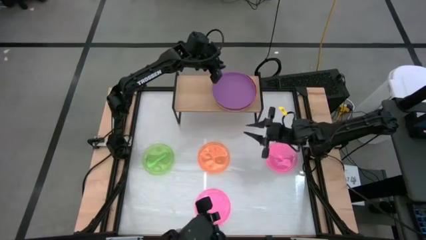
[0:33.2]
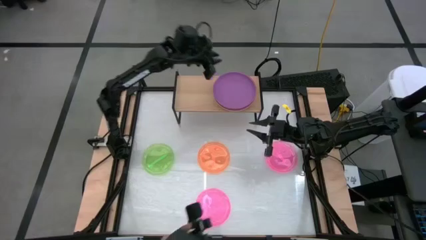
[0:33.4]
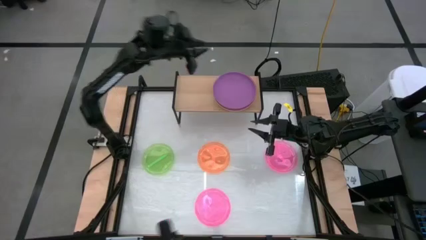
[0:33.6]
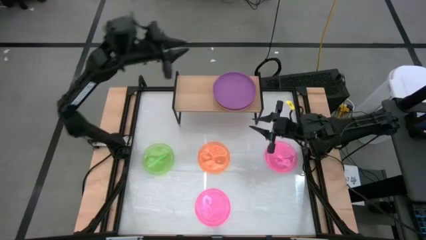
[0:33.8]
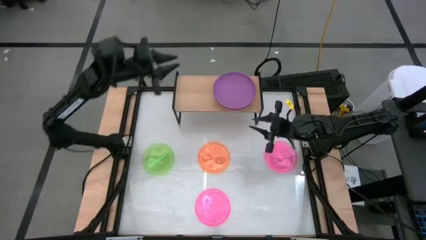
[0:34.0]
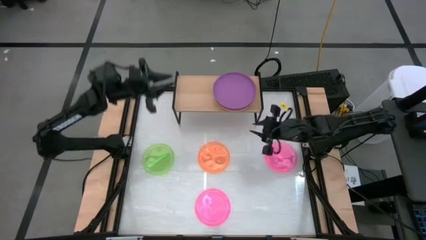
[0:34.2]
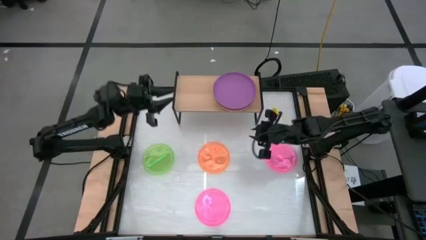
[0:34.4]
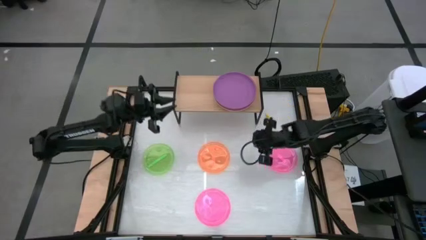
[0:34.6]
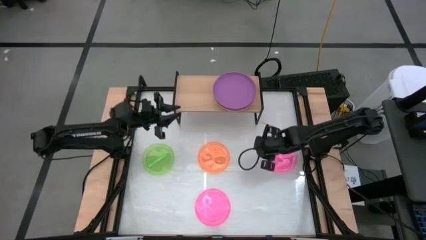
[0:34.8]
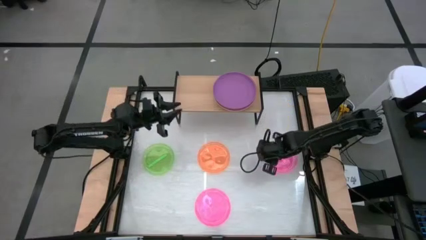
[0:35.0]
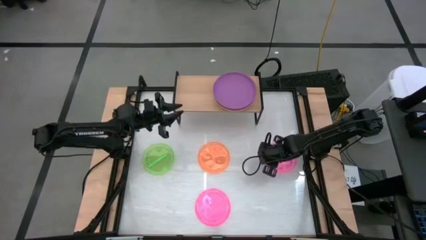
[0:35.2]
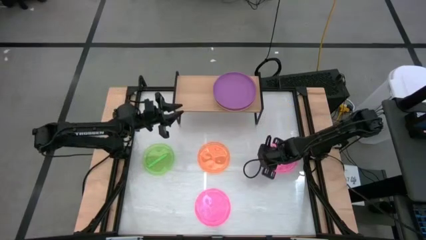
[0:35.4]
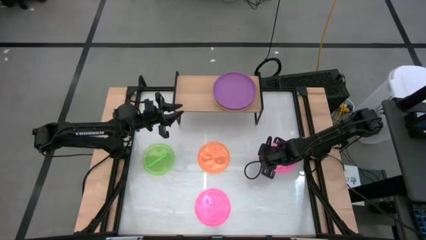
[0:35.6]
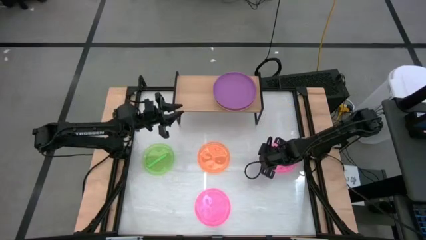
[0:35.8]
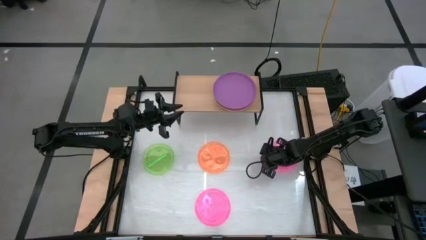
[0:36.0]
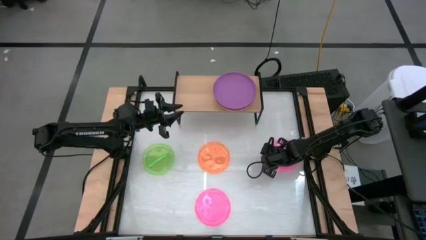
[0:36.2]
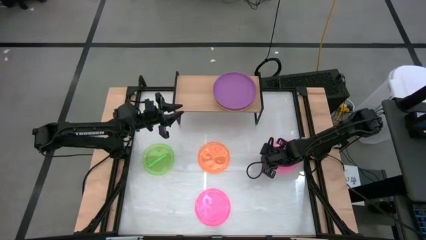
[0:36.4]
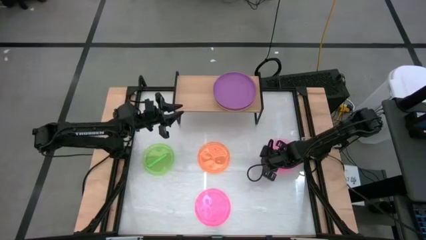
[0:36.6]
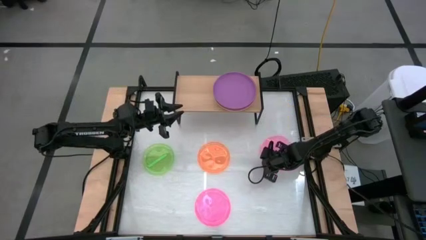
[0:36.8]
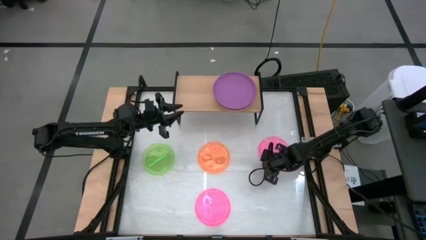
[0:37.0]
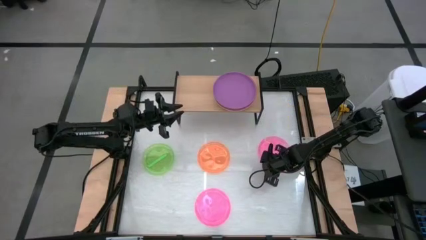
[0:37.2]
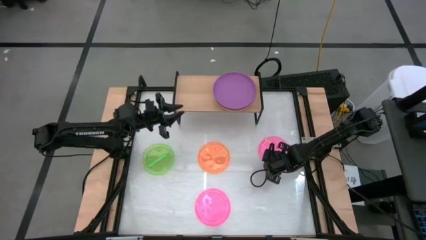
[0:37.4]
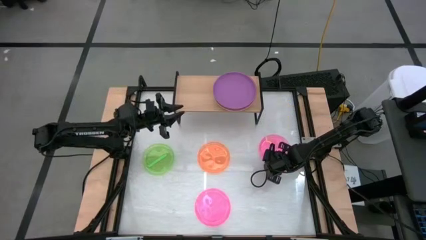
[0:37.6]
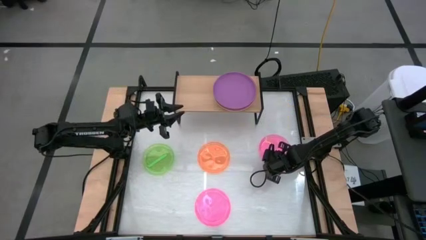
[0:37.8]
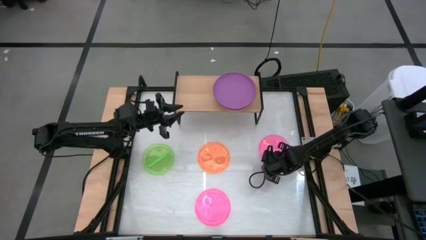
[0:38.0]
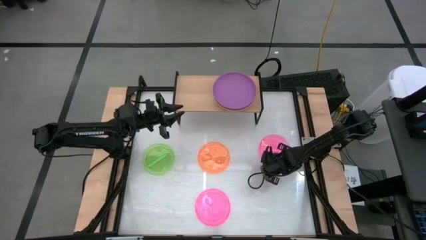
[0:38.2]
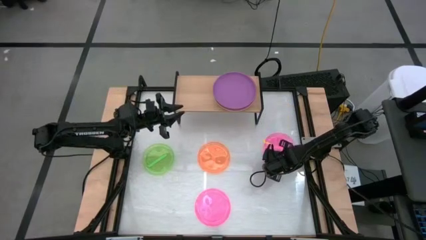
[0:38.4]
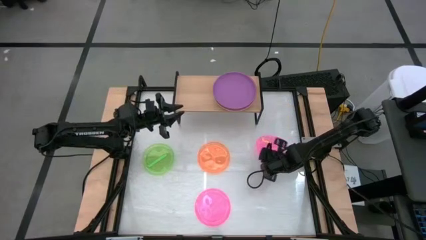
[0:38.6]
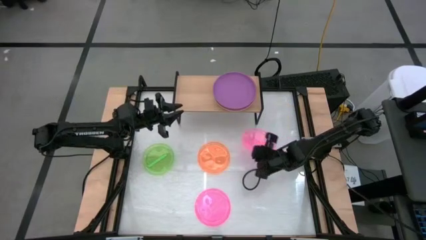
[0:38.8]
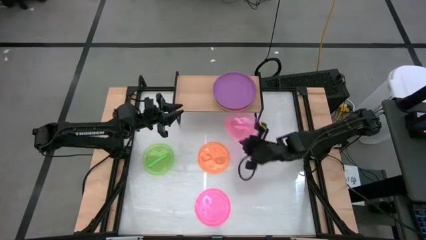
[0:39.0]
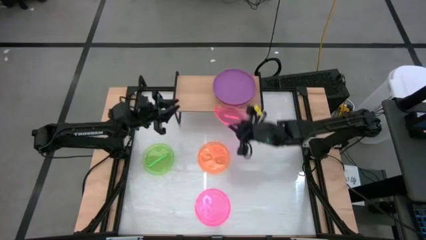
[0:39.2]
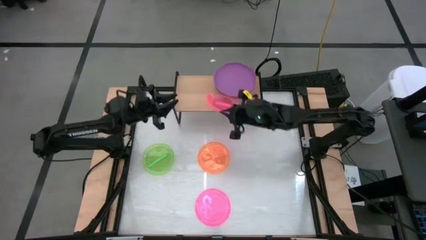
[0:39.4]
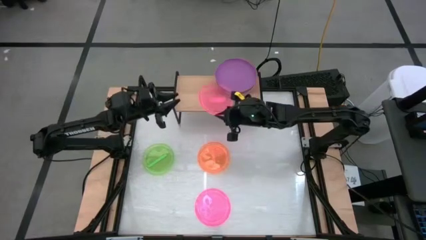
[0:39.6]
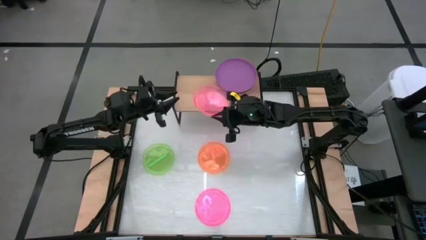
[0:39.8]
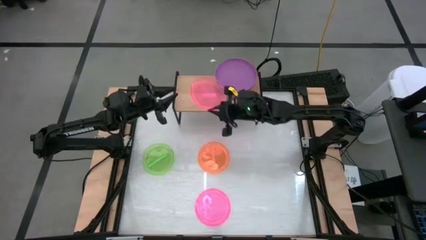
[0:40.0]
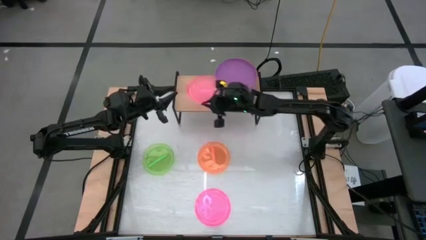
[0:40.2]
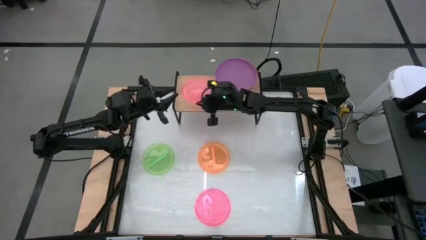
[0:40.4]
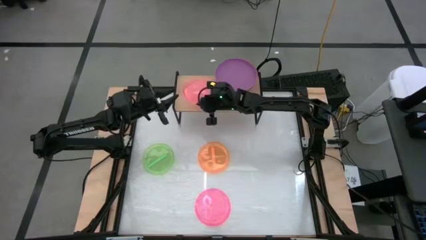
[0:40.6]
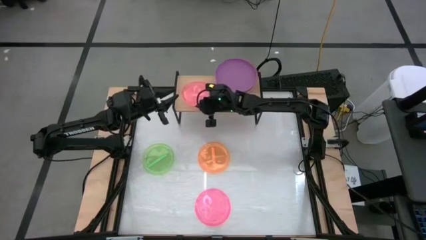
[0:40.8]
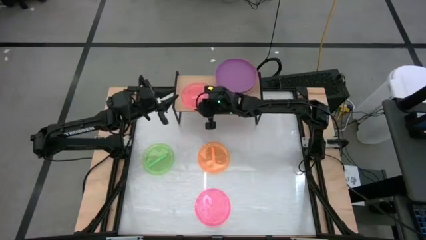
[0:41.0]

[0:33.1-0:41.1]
Task: Place and stack plates onto a shelf
Put the top right pink transparent plate to the right on the shelf

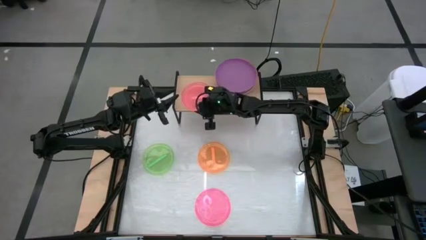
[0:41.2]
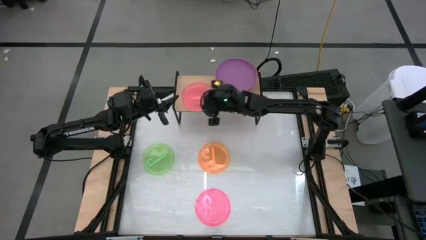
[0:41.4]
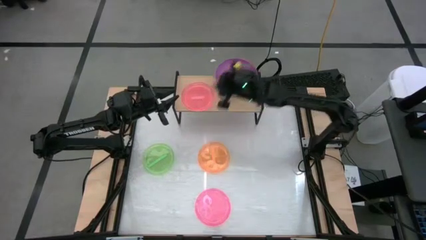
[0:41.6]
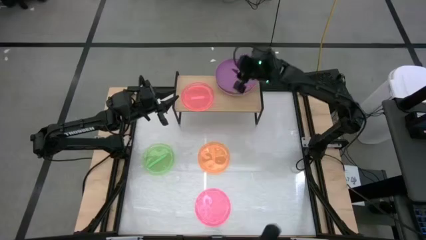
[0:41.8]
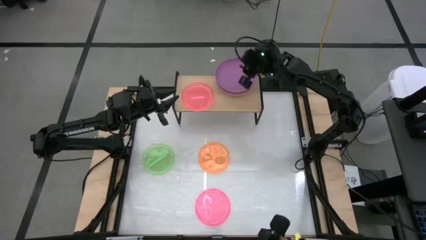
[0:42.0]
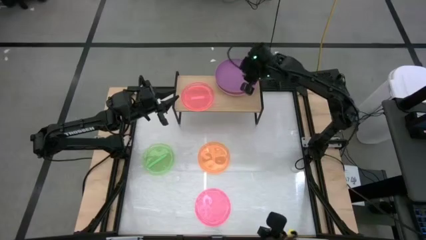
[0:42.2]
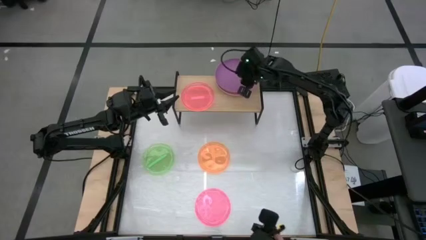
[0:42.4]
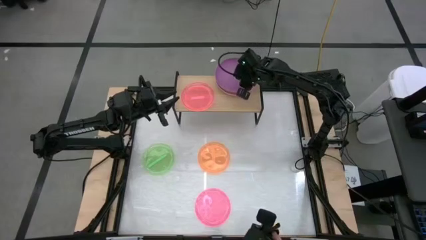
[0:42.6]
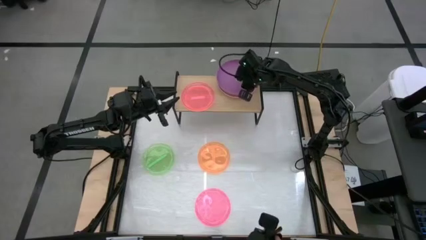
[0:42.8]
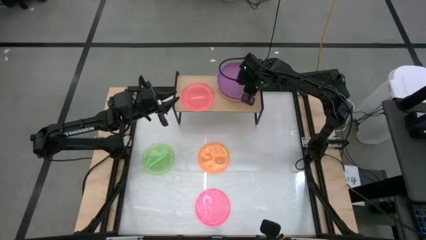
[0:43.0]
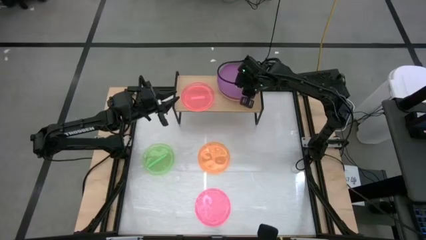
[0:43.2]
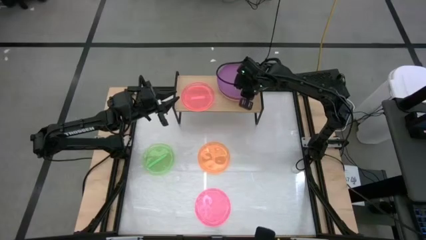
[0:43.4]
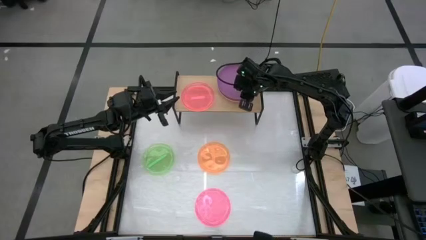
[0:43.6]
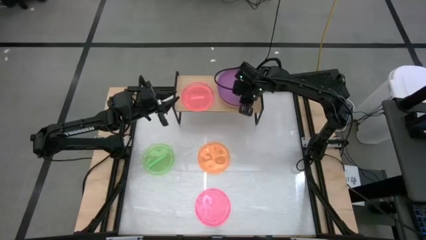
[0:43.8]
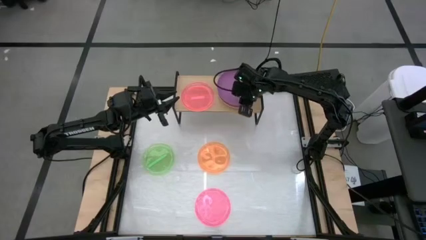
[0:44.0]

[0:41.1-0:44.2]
Adjust the stacked plates on the right side of the shelf

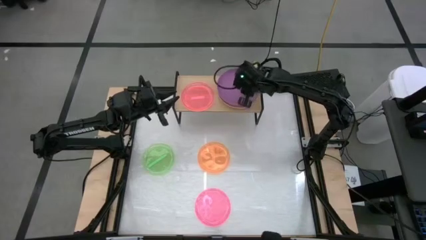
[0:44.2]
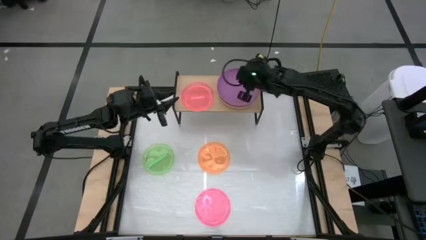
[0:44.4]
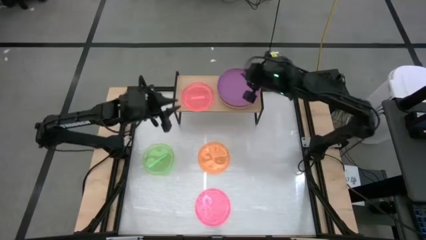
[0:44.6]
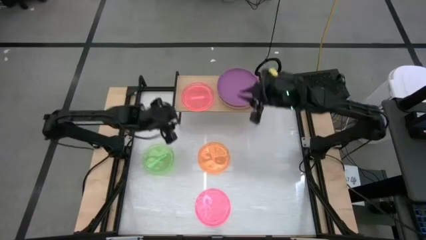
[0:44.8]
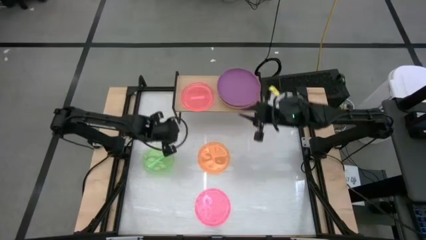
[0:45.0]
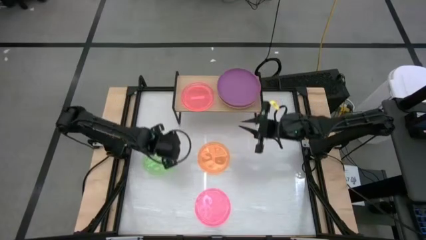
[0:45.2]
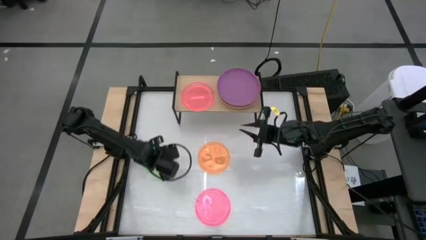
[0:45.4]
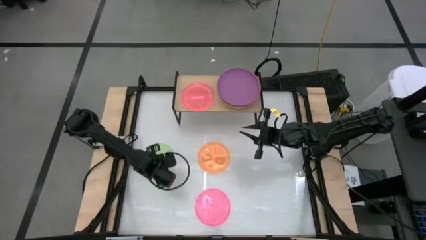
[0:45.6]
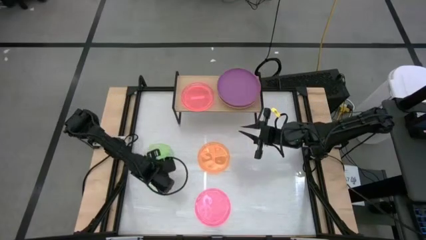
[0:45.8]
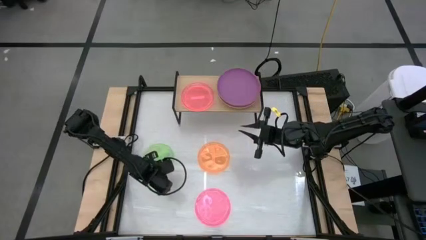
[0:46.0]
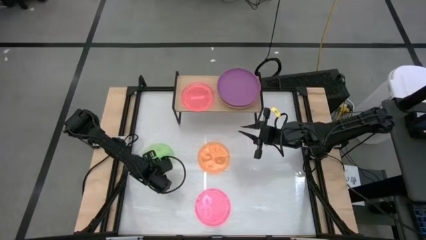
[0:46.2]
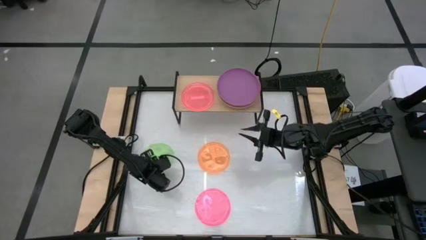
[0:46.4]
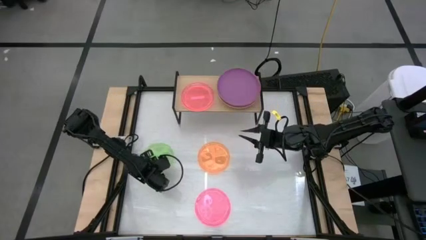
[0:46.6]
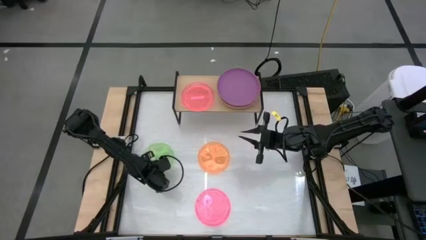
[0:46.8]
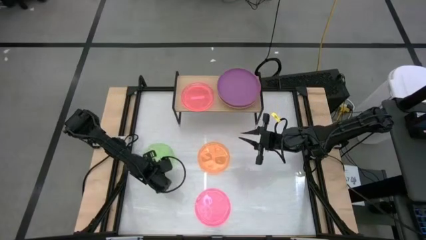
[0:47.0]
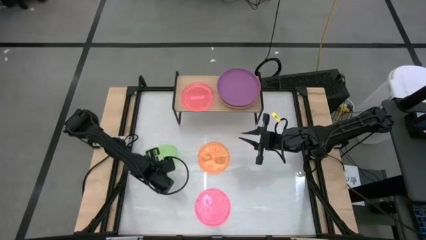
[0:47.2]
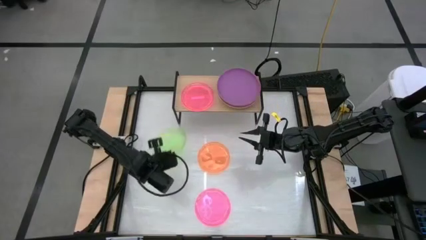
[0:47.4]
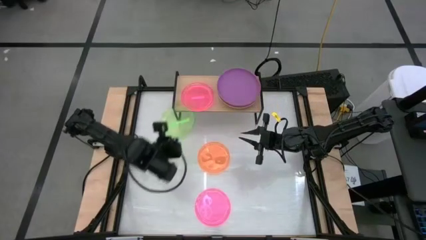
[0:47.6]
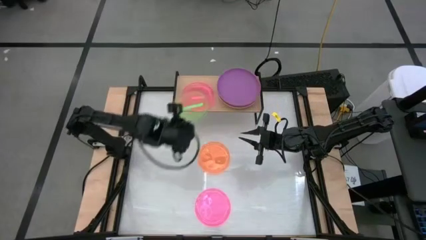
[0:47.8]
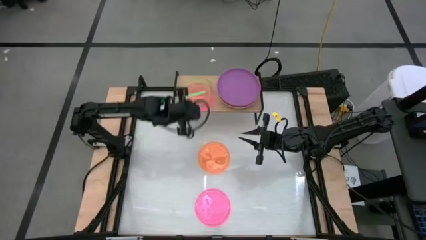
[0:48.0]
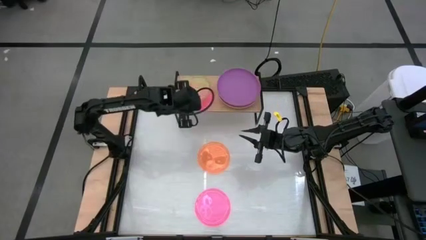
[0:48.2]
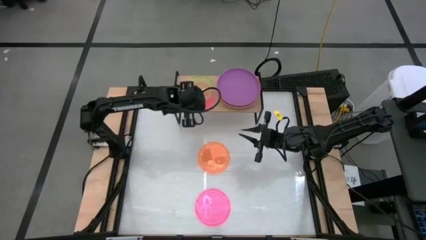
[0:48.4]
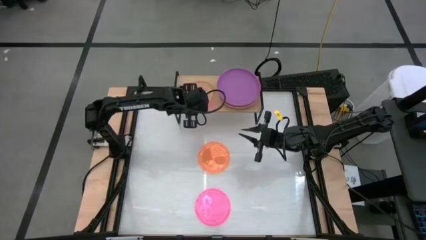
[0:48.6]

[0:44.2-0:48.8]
Stack the green transparent plate on top of the pink transparent plate on the shelf
